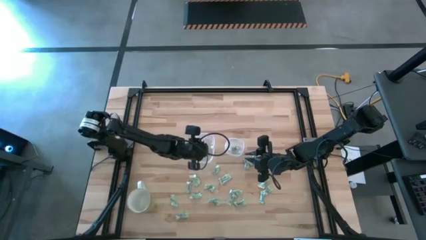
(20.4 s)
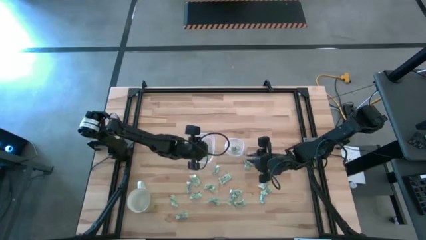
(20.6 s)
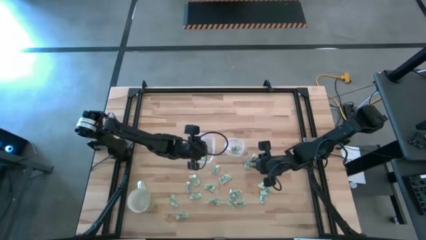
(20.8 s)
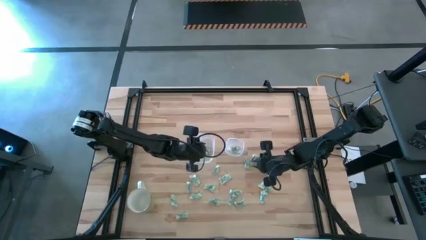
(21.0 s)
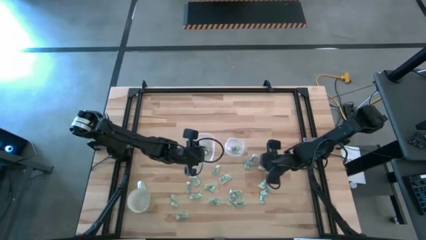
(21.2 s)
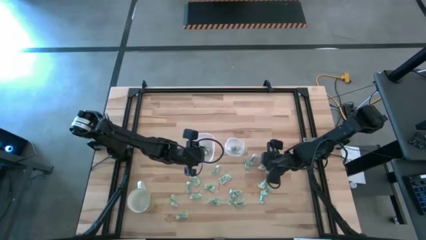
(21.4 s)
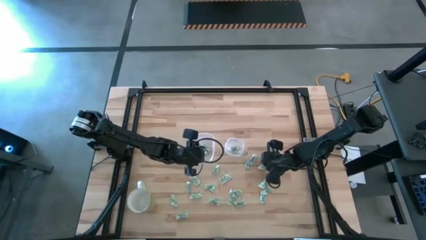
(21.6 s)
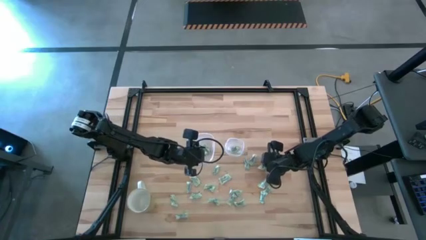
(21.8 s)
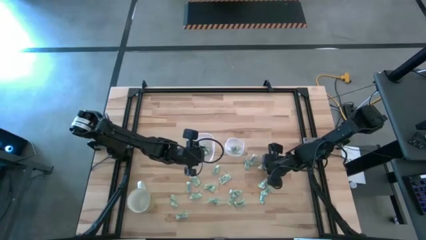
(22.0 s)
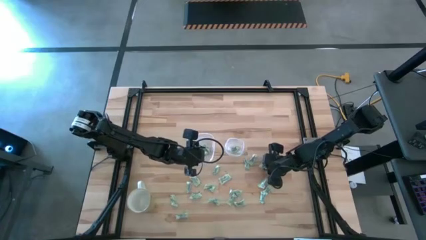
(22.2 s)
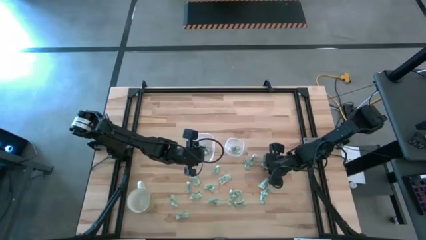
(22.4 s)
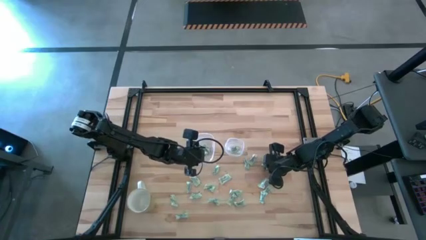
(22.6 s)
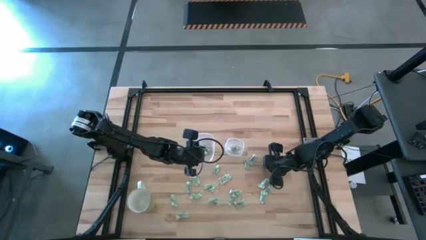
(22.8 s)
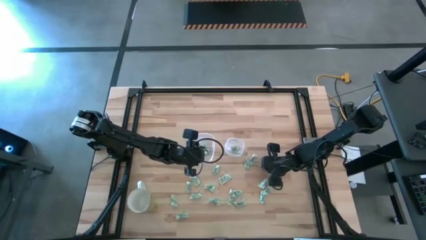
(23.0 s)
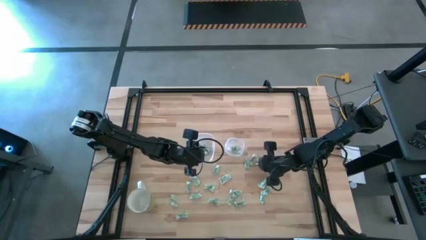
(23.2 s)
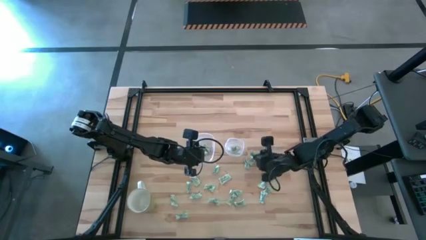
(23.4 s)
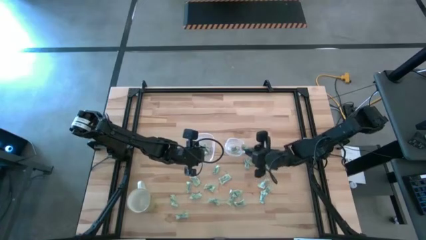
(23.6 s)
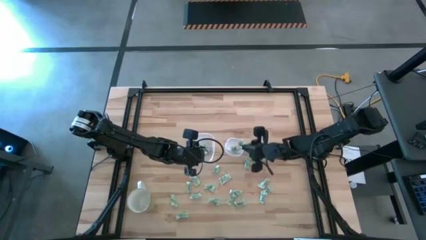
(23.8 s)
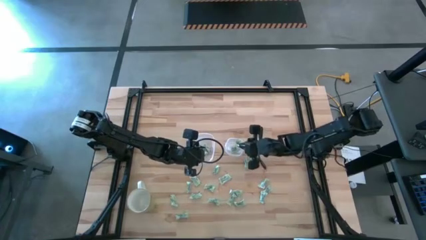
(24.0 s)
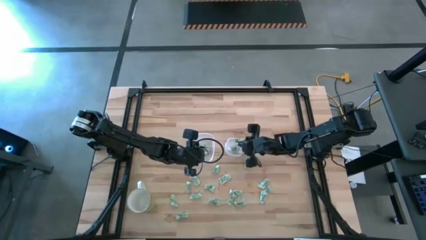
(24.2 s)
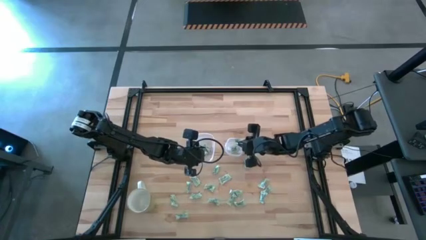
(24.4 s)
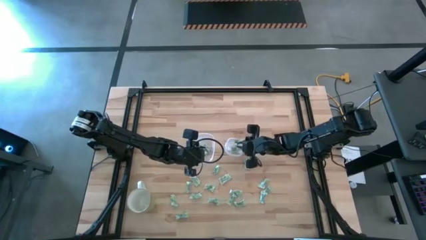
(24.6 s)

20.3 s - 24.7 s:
Task: Pick and place items into bin
Put the white stevia packet into the right transparent bin

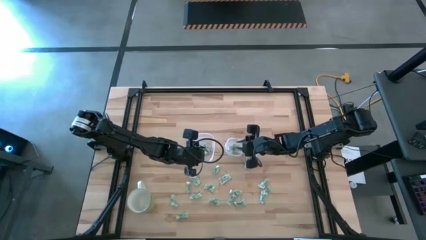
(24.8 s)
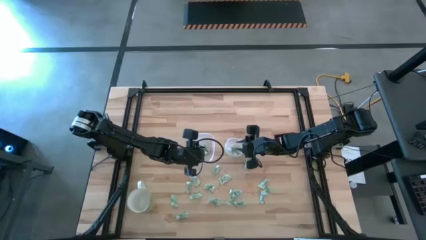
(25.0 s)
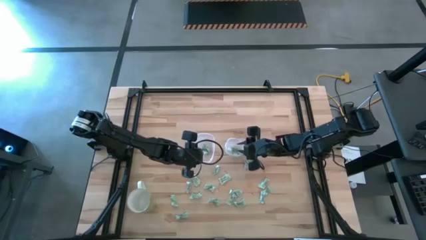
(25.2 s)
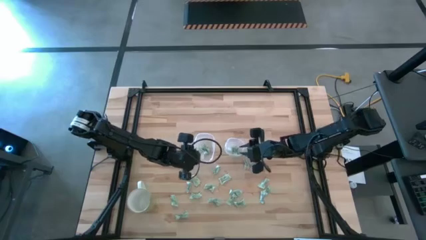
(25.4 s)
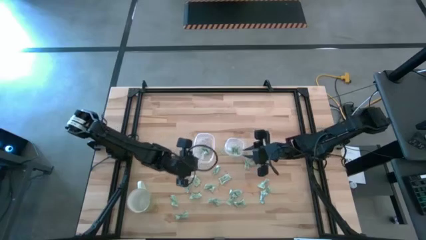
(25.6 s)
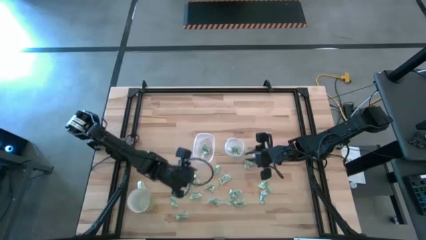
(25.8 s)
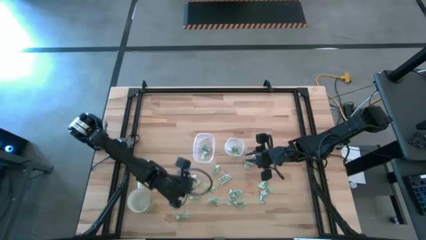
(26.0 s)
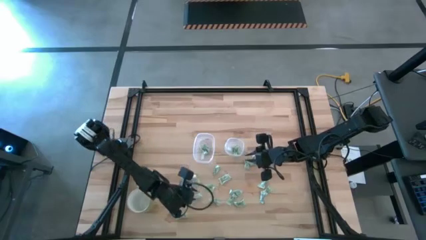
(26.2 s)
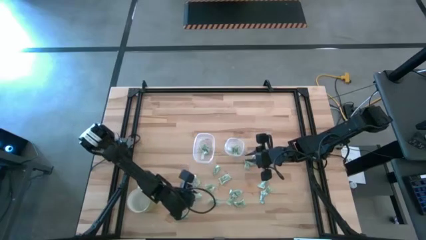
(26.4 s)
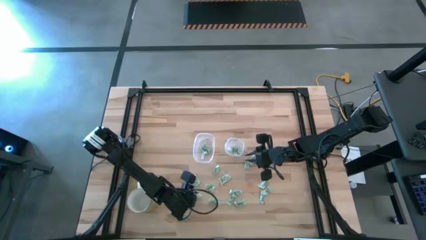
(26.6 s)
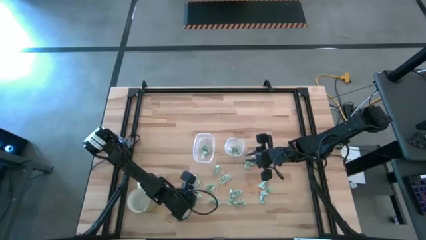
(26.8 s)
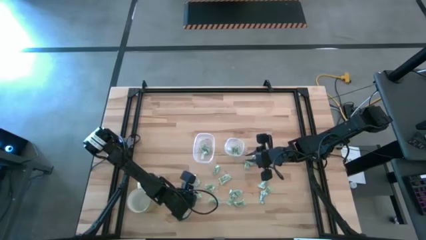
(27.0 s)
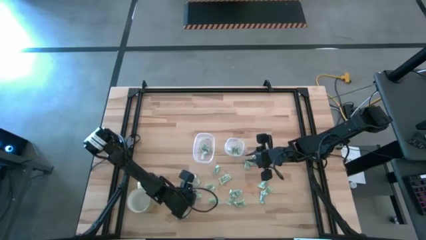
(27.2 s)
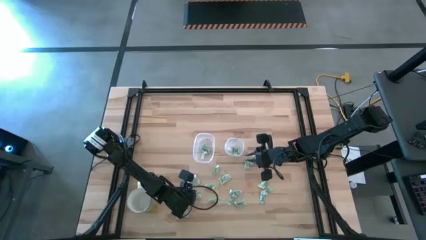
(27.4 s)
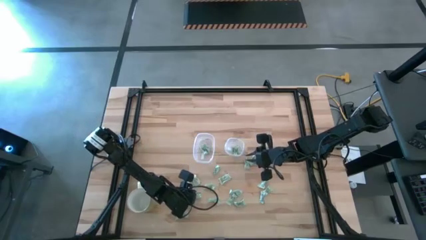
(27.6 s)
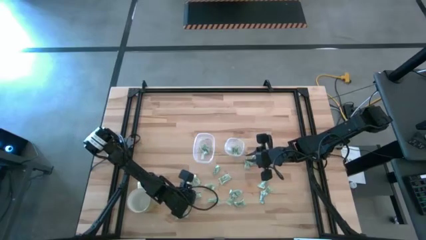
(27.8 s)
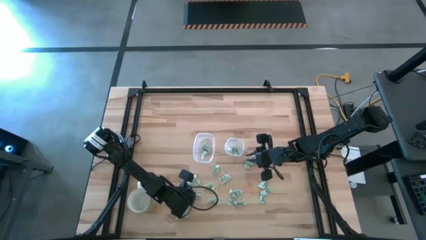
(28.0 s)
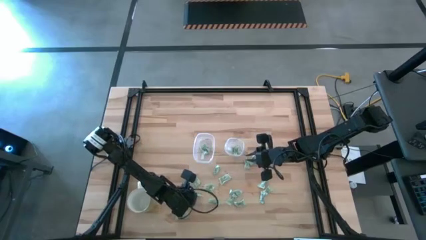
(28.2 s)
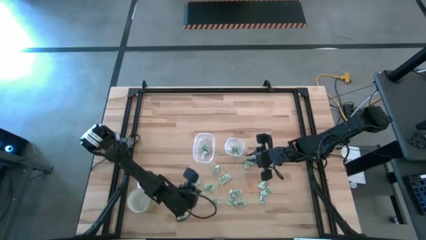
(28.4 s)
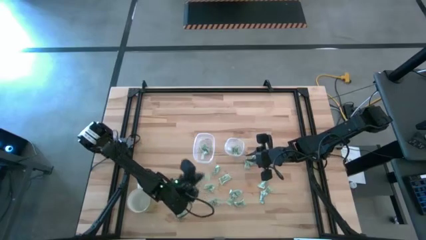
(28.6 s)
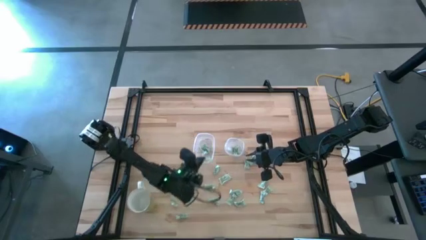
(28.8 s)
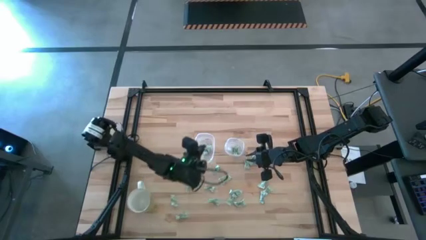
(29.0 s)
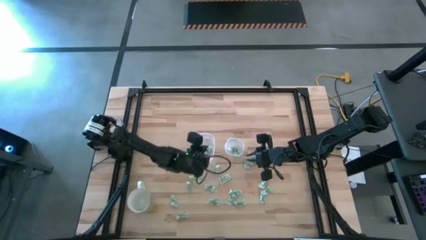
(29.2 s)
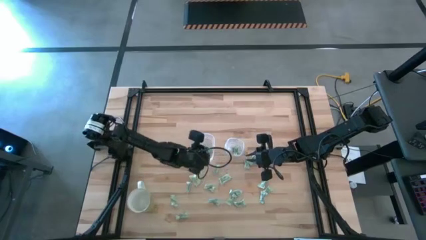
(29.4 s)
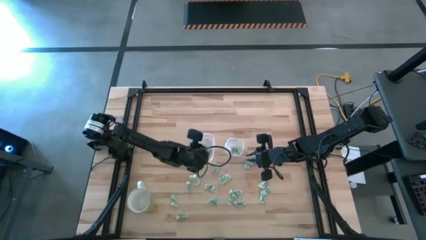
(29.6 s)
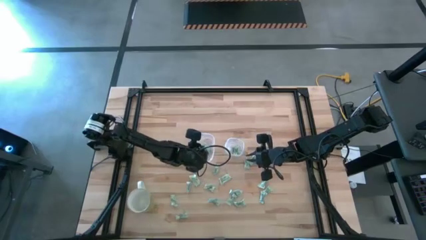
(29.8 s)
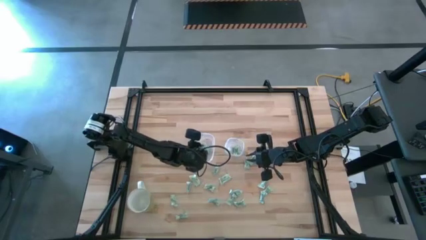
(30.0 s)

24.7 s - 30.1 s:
Put the white stevia packet into the left transparent bin

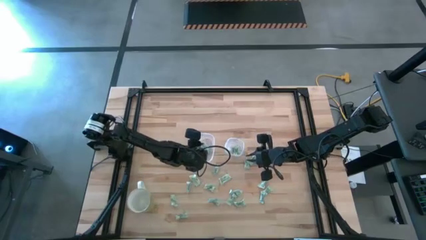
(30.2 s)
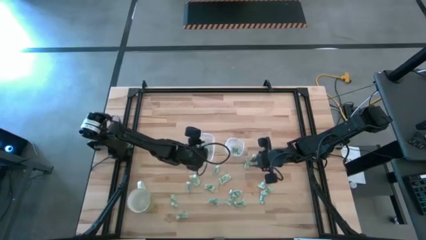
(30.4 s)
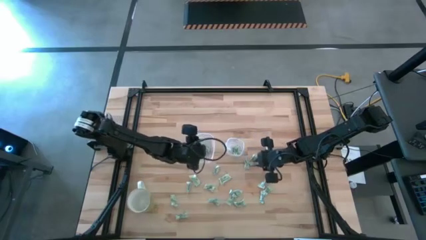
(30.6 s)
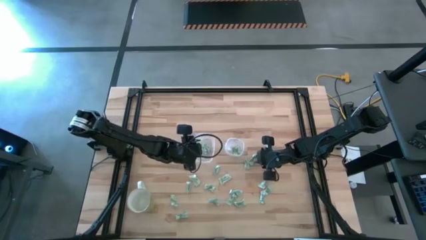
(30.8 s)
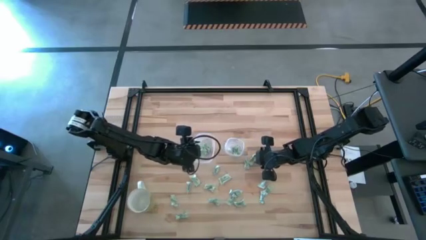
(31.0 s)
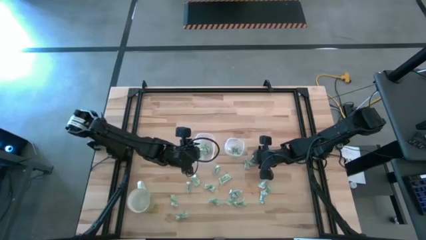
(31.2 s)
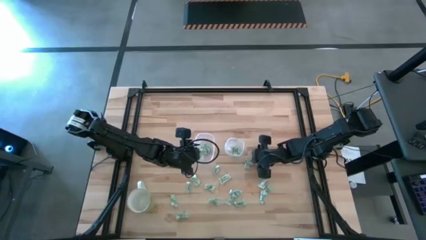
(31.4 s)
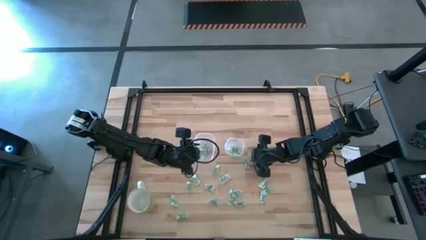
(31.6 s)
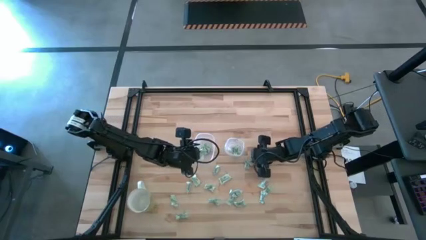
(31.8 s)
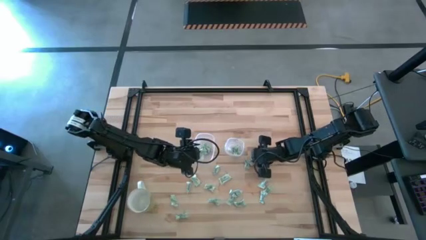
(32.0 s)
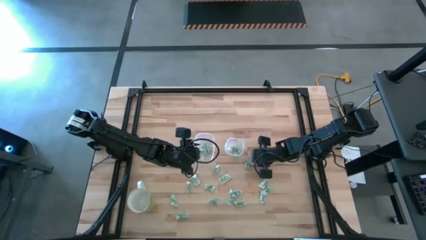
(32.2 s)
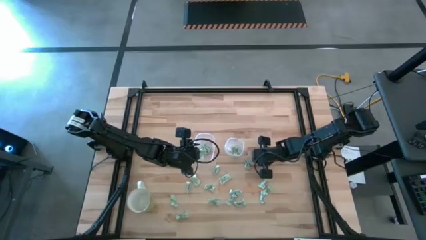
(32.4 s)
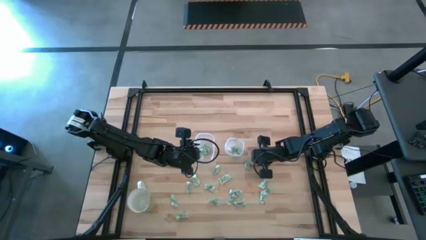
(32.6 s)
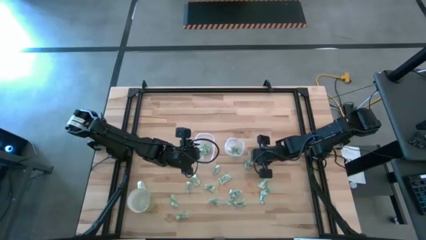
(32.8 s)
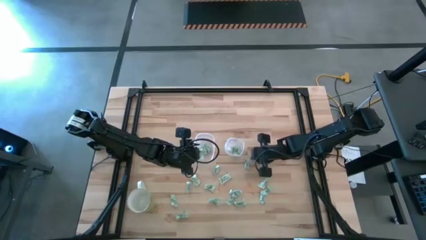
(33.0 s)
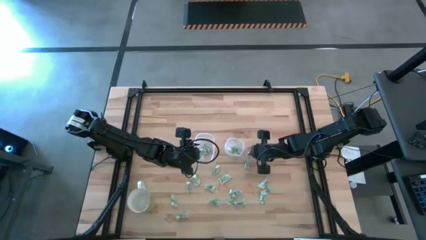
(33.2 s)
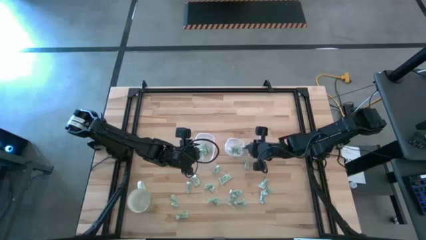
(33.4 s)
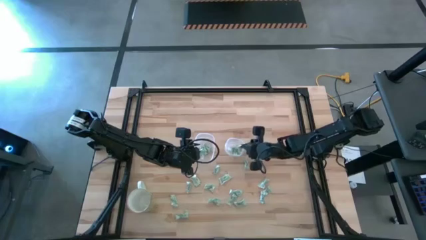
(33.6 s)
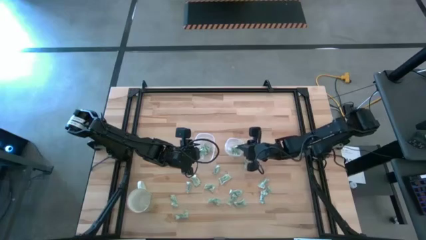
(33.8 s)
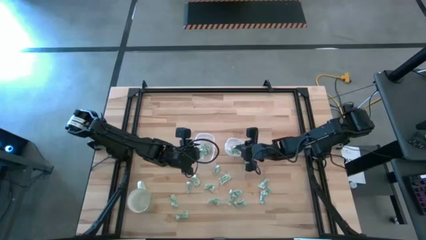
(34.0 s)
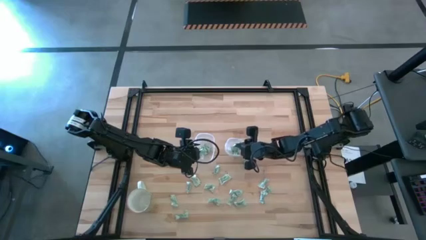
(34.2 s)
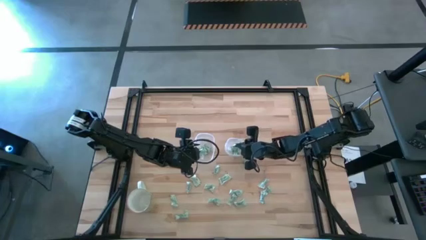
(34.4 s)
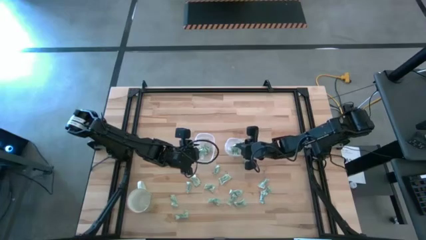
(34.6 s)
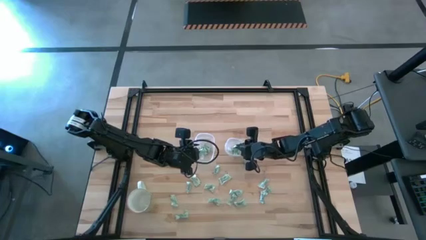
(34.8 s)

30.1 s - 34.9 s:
Put the white stevia packet into the right transparent bin

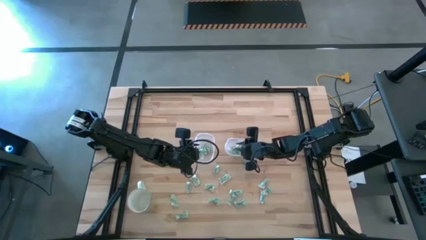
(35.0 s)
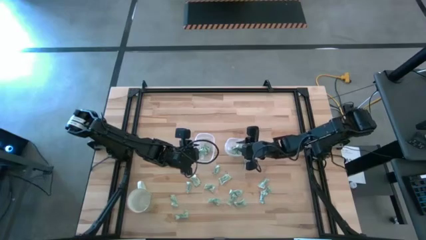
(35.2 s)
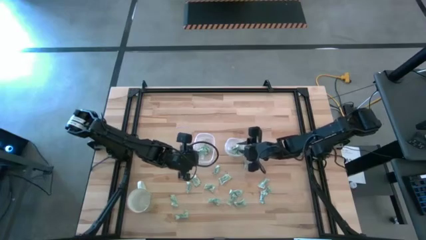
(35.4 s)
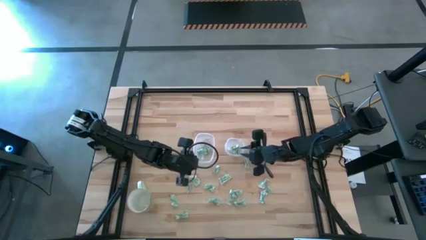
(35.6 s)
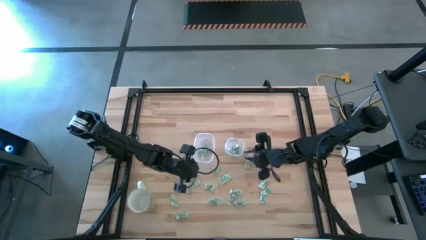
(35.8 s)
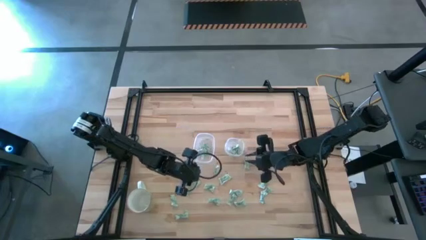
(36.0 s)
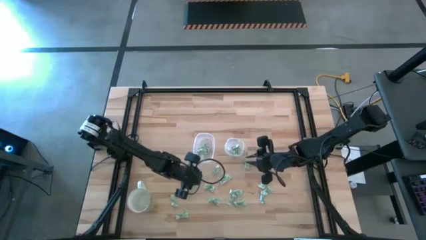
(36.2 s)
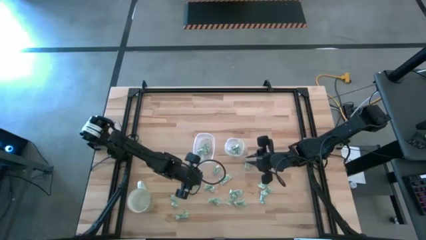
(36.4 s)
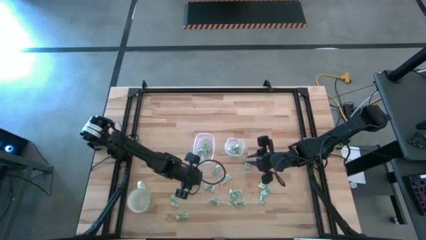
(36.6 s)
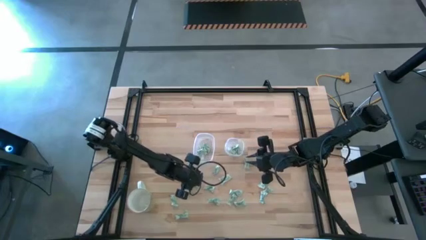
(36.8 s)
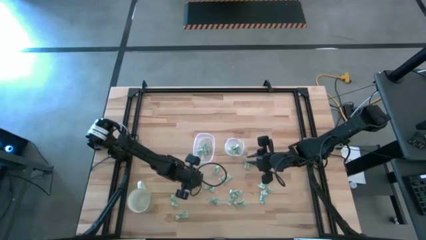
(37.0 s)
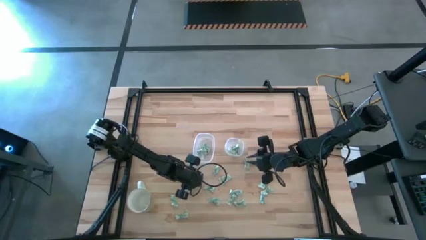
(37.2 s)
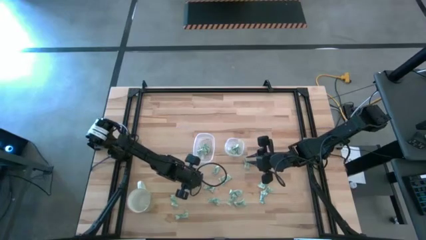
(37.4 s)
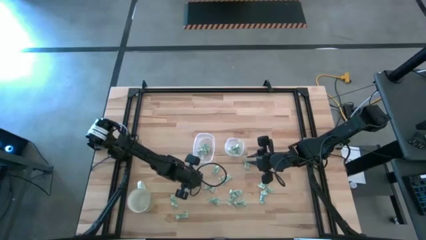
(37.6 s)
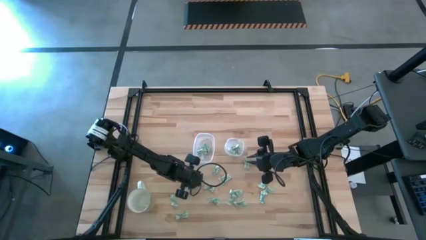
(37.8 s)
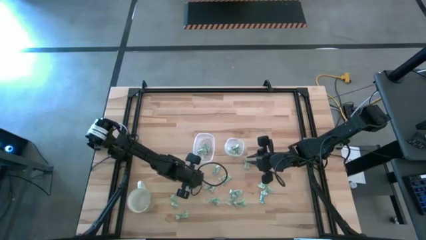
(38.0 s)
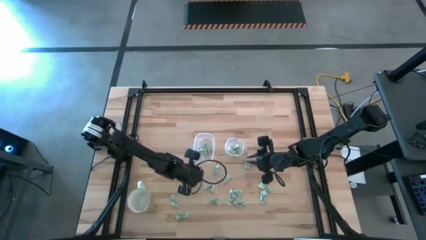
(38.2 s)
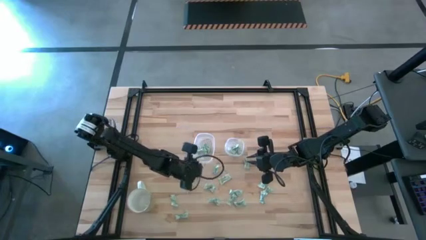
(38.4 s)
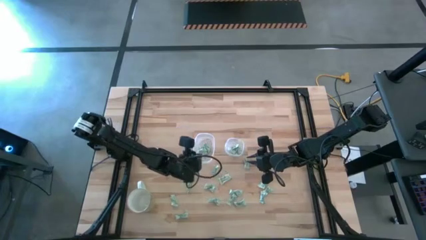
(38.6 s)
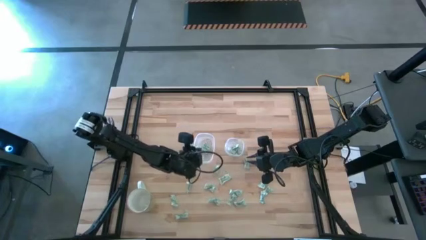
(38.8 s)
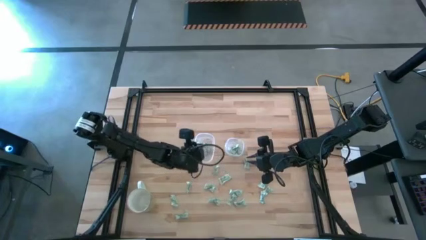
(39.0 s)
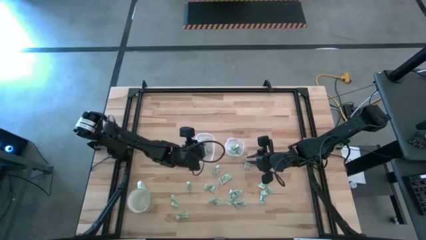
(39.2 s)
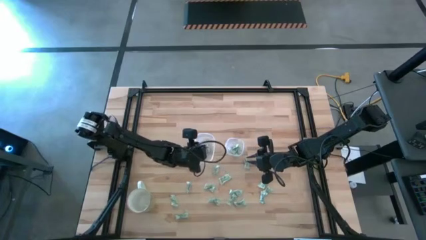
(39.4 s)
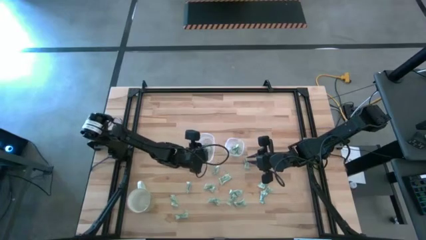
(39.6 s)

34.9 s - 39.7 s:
Put the white stevia packet into the left transparent bin
